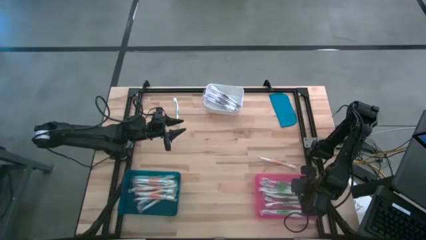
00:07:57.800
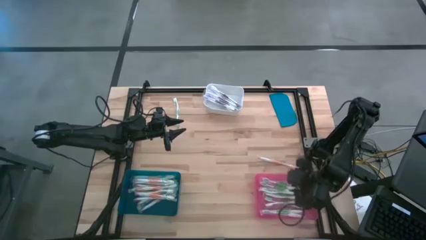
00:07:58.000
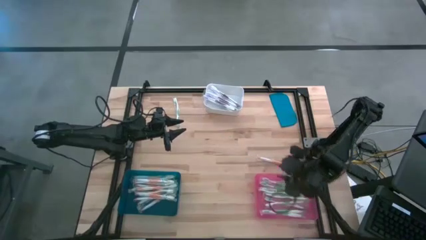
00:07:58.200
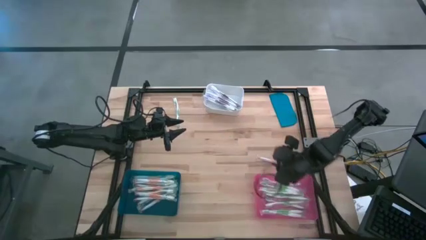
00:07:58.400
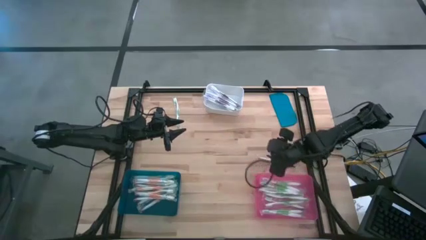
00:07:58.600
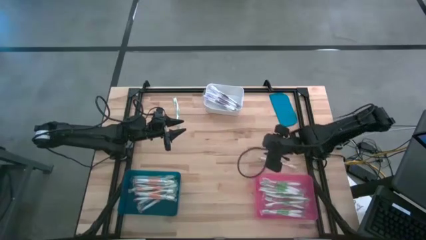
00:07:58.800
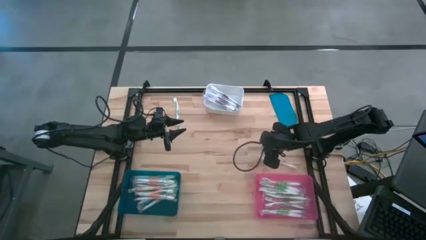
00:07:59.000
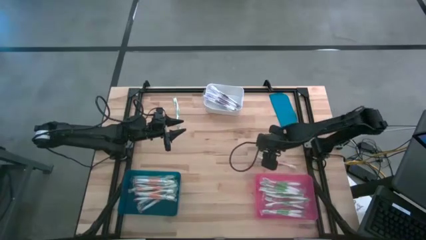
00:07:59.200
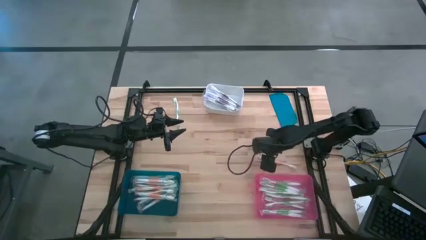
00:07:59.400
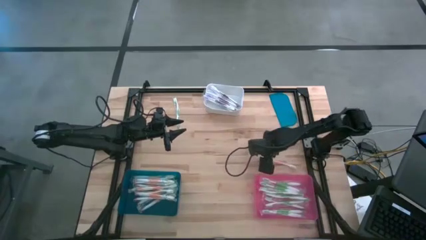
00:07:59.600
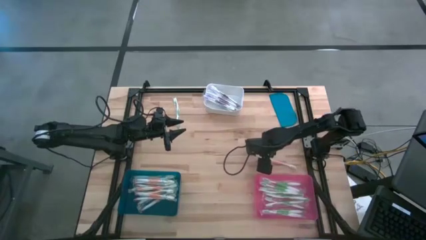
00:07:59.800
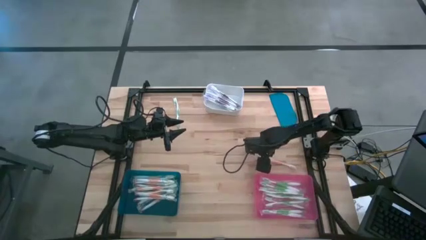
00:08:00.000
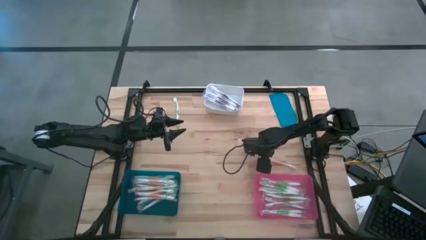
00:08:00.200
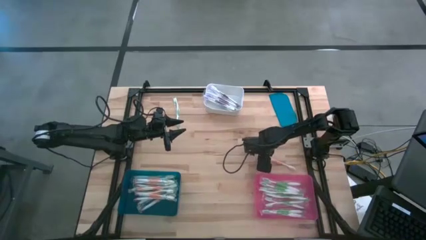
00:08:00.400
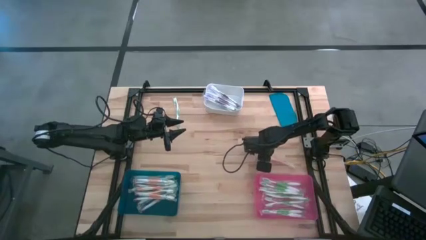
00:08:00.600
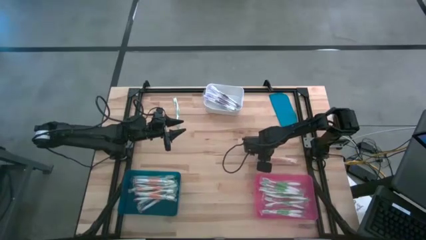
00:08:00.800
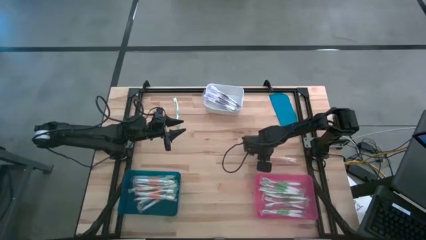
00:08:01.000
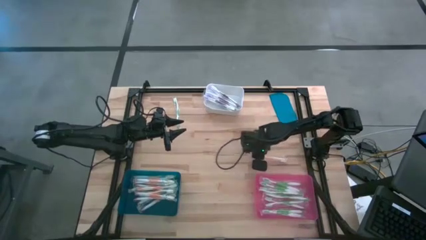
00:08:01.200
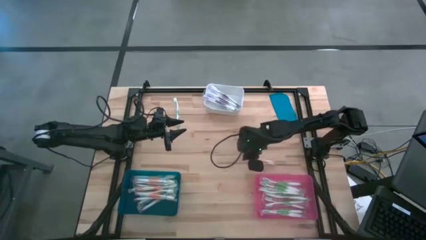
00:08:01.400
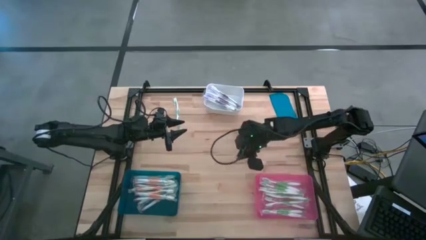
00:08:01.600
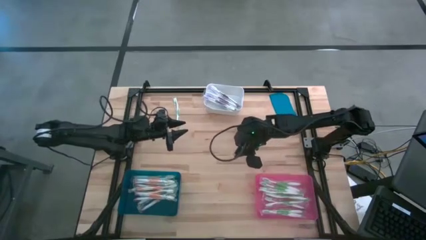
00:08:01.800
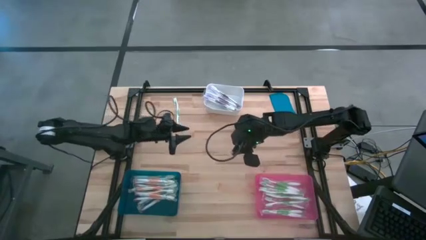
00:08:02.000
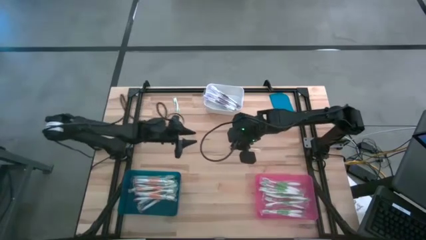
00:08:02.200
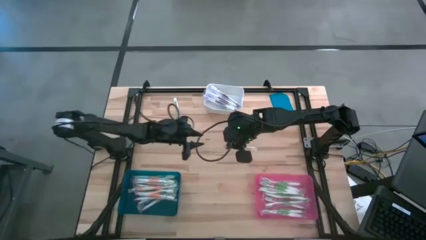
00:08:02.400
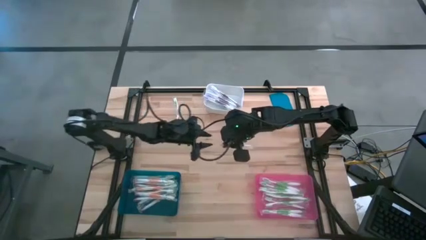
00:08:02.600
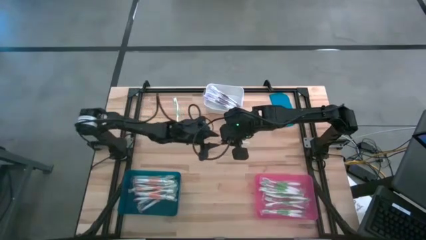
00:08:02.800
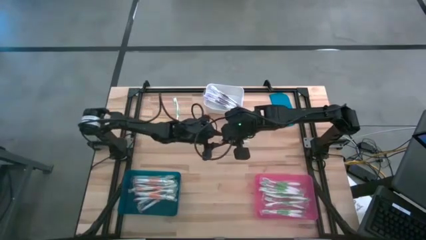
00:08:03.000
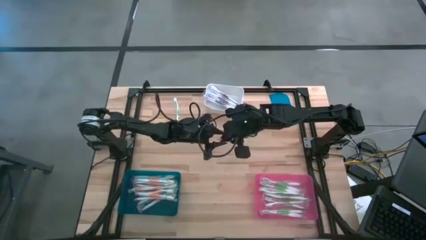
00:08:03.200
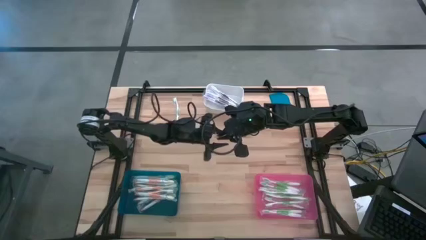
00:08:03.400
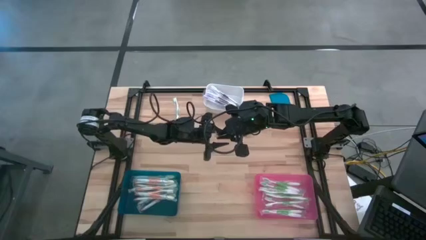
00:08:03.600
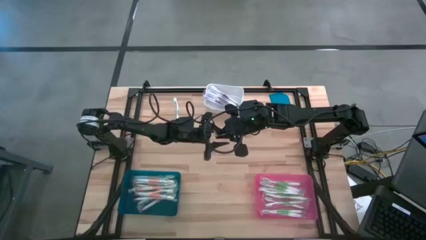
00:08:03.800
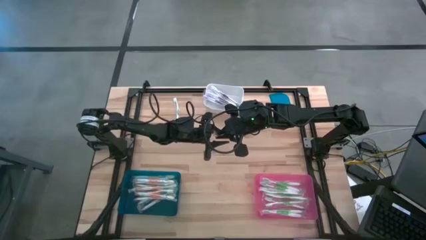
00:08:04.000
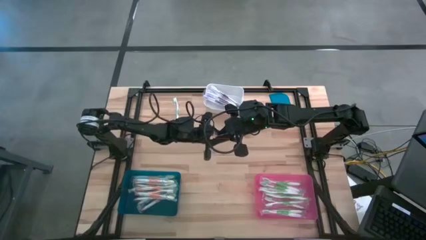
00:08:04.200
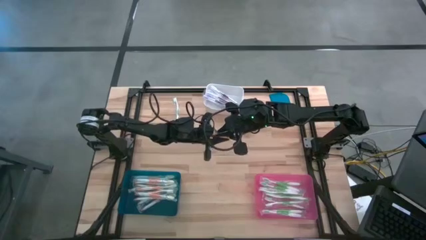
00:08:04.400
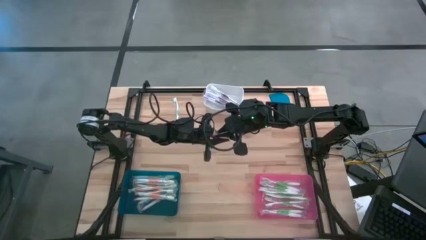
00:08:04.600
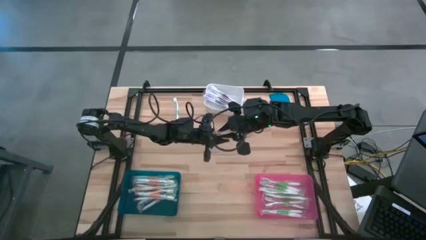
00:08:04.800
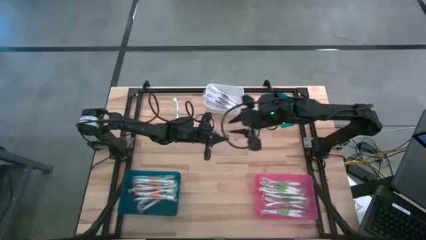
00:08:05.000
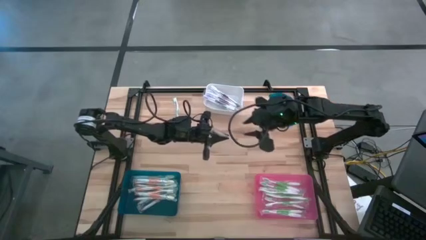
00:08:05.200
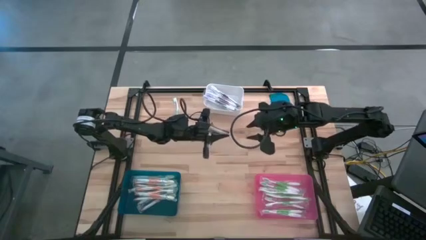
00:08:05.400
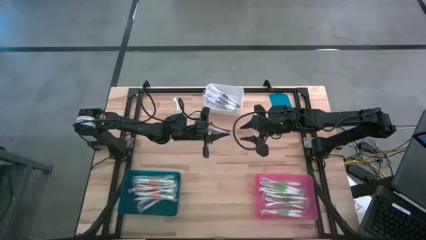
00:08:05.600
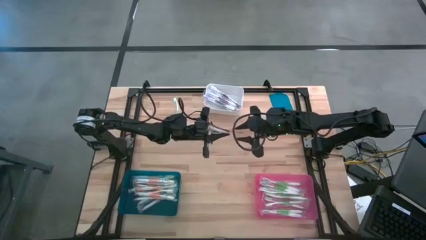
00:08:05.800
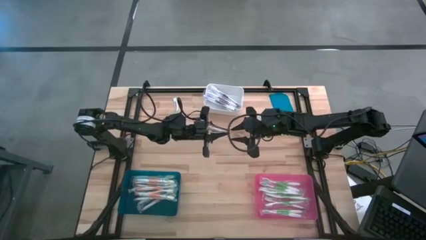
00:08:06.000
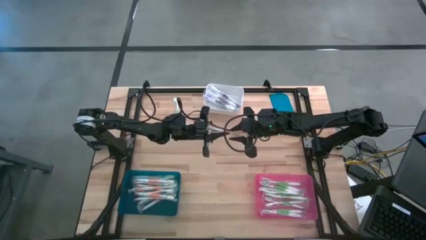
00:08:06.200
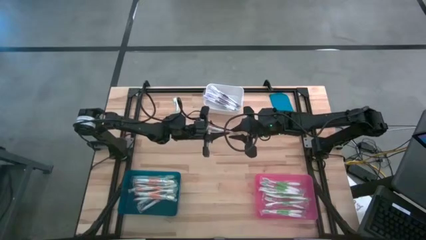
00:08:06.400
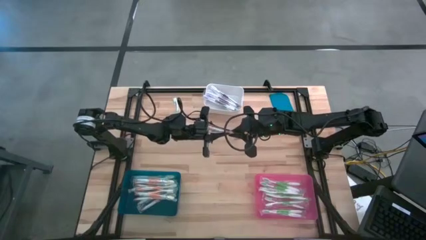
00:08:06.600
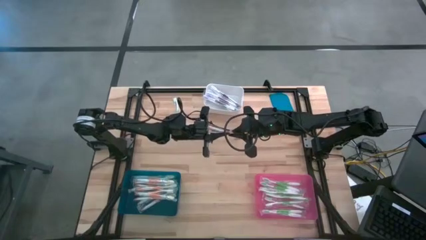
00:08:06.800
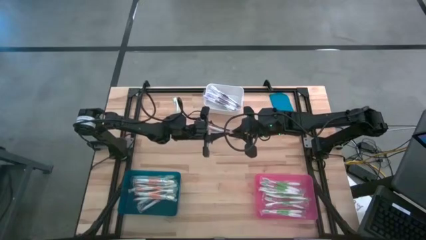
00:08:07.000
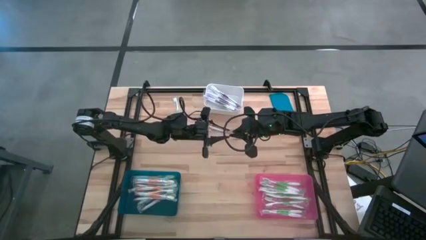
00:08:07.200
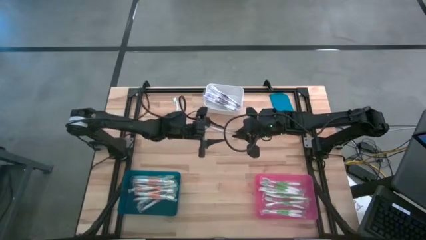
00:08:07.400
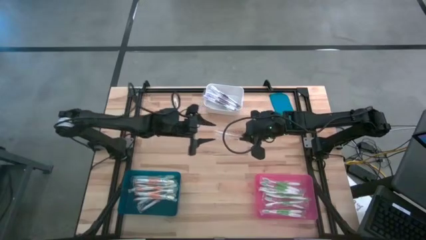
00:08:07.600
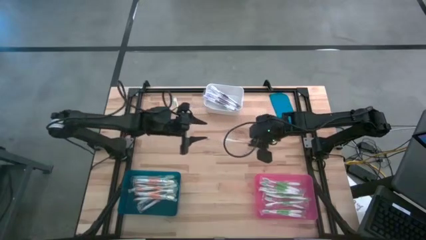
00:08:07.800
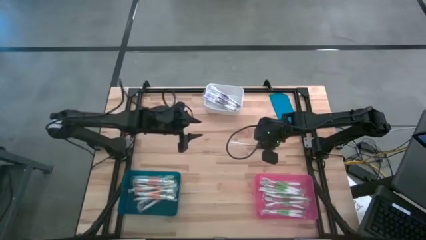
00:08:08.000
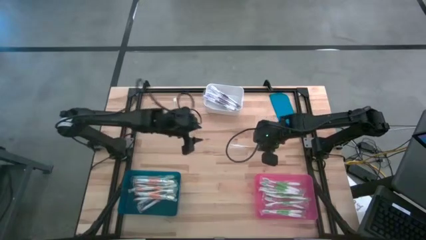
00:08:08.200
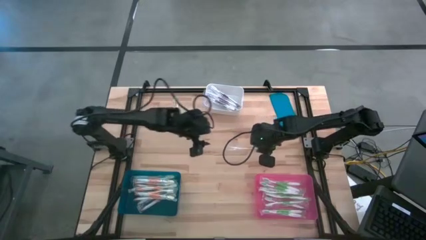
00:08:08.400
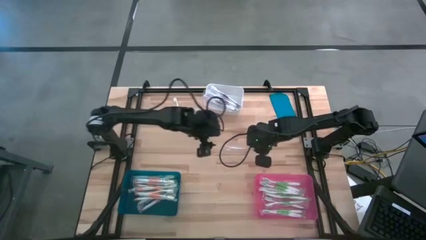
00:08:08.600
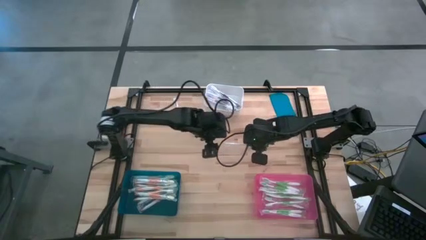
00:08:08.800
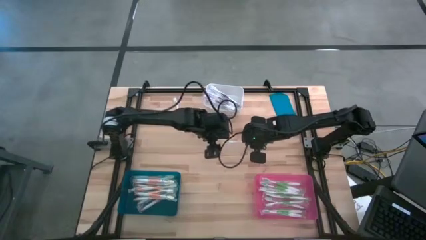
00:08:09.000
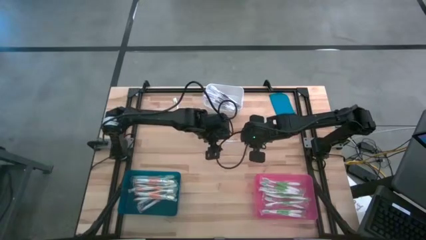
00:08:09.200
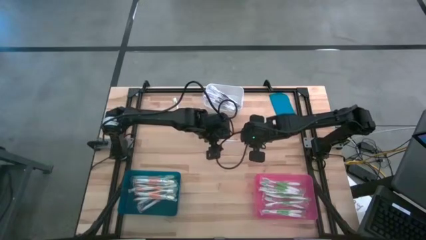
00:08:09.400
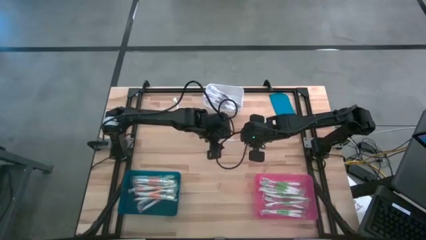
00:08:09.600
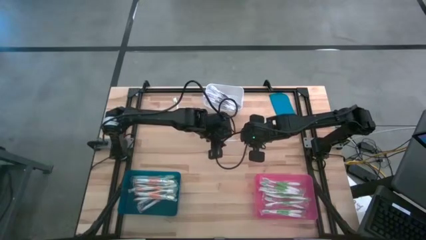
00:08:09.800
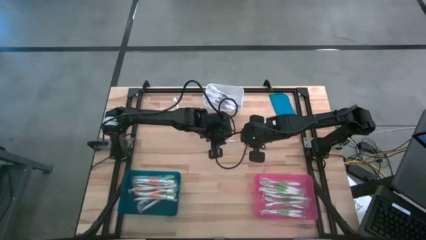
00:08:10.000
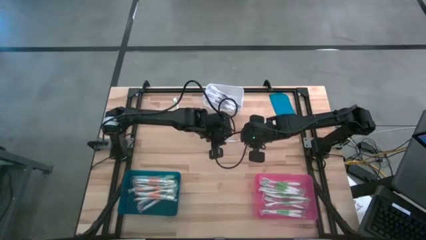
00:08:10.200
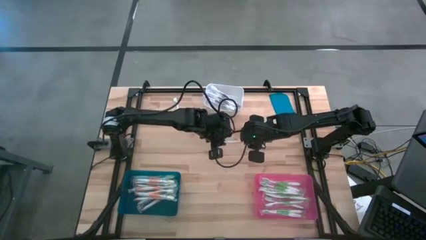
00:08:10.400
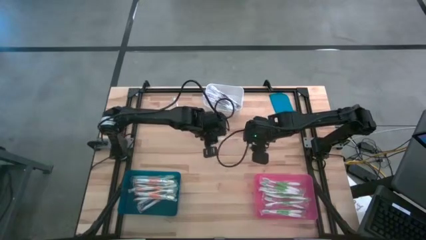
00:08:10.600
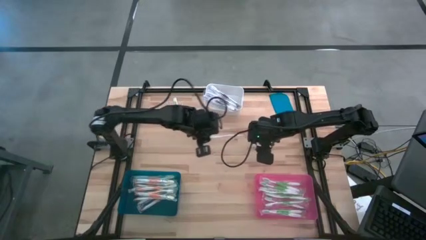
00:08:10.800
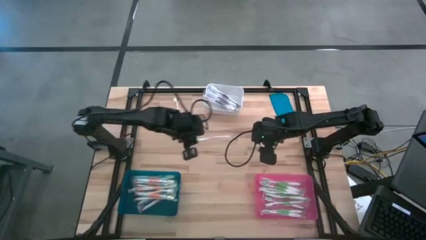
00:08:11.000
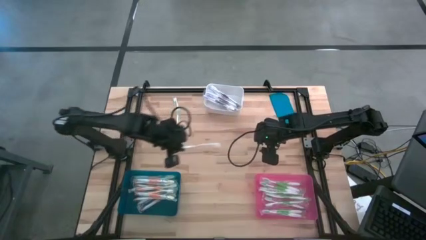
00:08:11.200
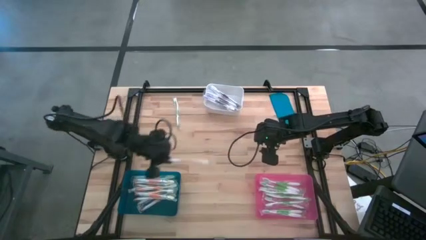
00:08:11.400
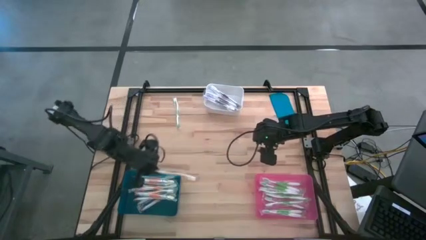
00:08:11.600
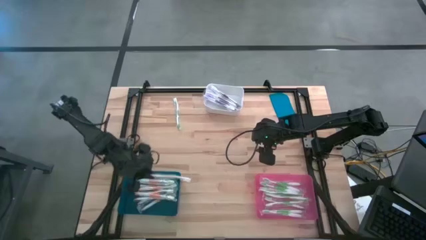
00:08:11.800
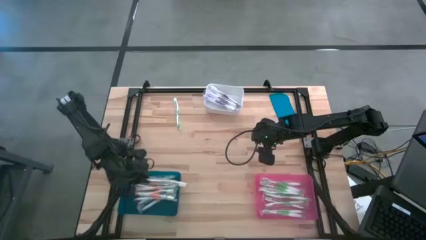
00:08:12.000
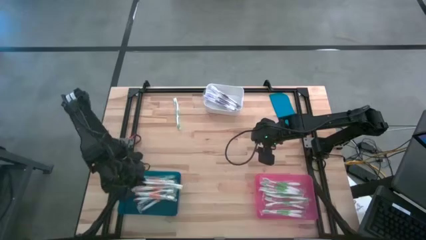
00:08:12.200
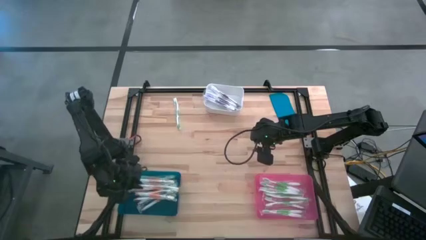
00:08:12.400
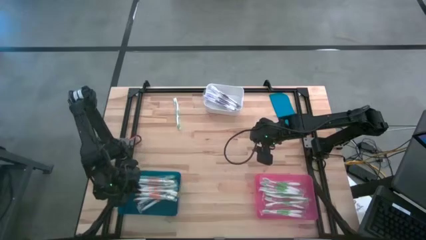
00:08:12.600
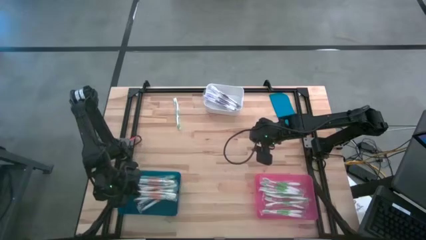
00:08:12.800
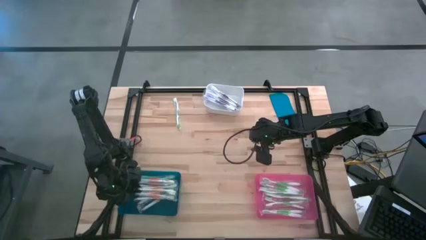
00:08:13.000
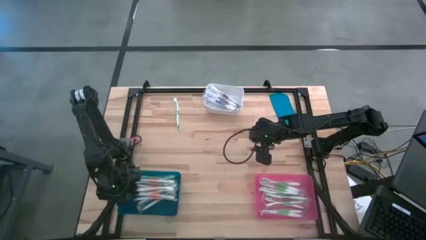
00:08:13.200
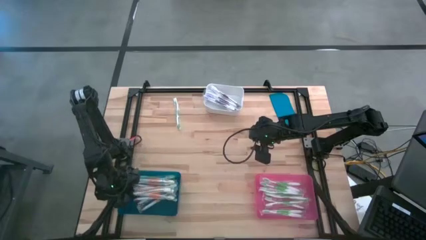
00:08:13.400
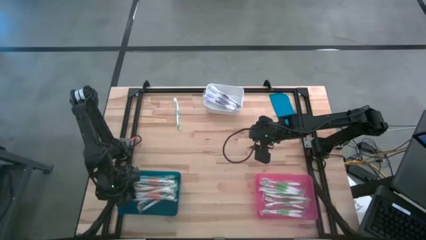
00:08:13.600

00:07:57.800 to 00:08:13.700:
Task: Pick & Place Toothbrushes
Put the orange toothbrush into the blue bin
